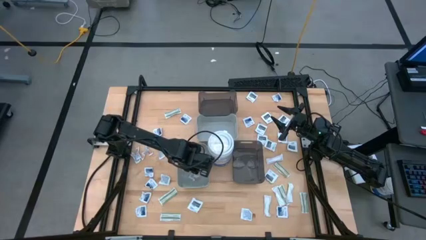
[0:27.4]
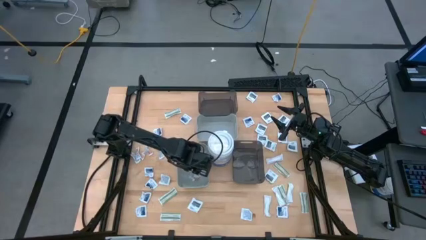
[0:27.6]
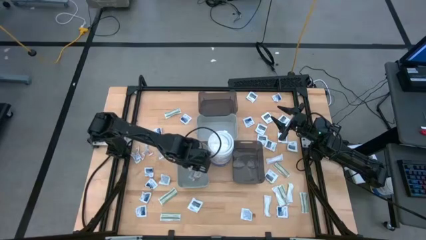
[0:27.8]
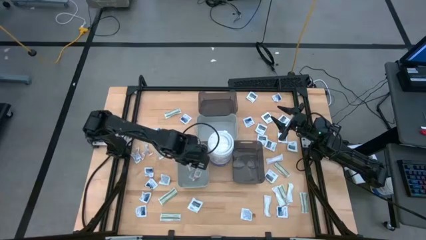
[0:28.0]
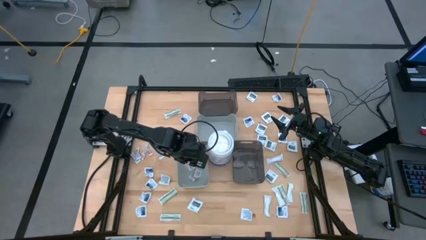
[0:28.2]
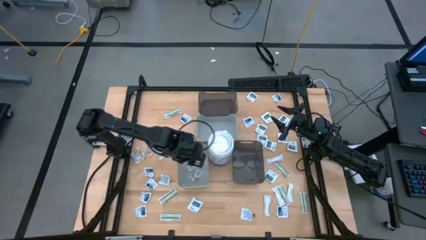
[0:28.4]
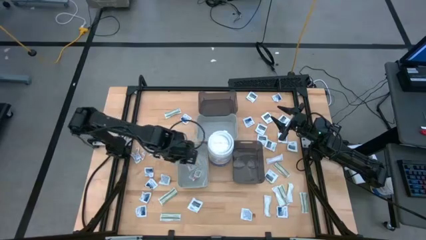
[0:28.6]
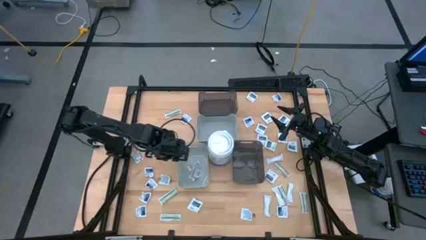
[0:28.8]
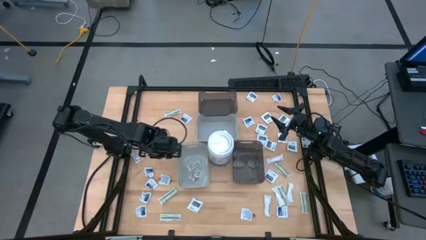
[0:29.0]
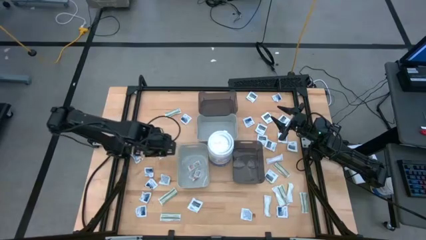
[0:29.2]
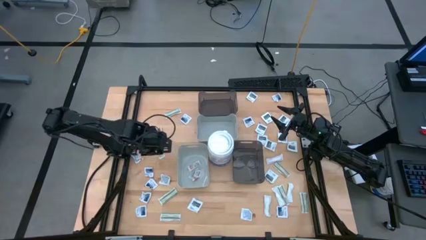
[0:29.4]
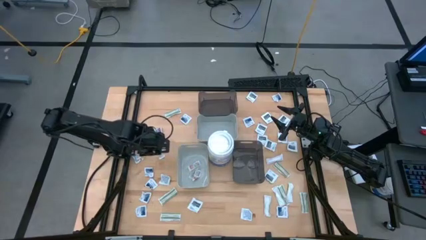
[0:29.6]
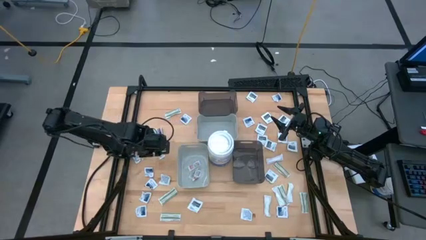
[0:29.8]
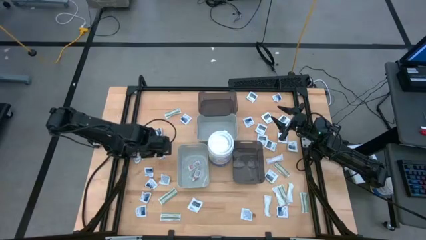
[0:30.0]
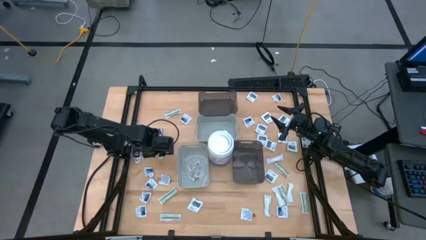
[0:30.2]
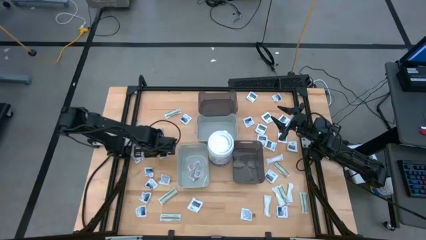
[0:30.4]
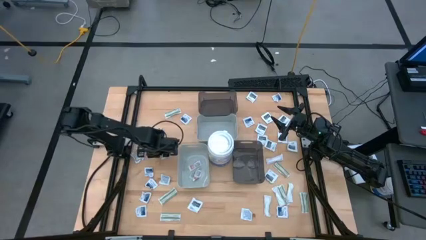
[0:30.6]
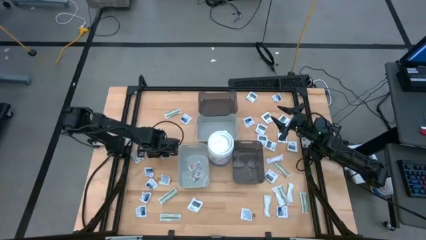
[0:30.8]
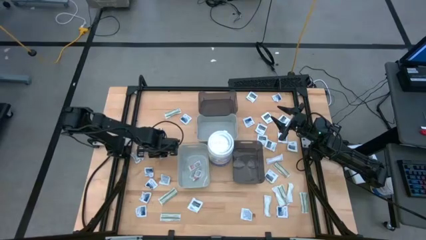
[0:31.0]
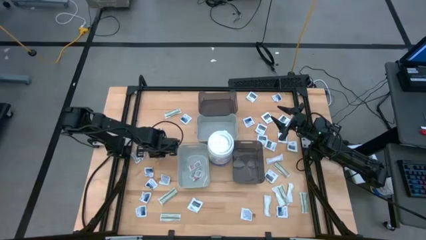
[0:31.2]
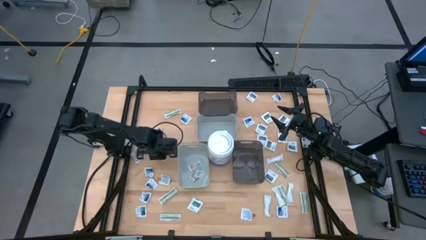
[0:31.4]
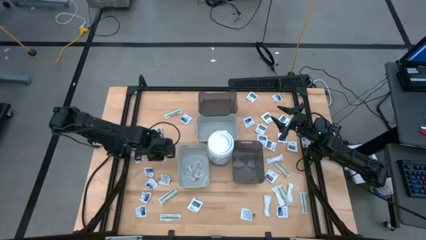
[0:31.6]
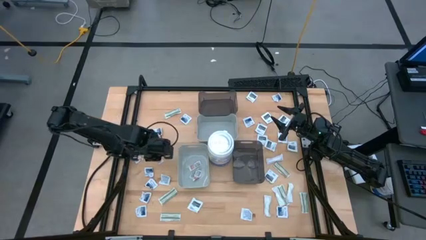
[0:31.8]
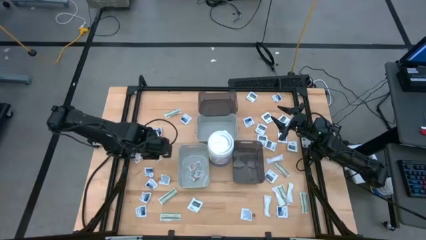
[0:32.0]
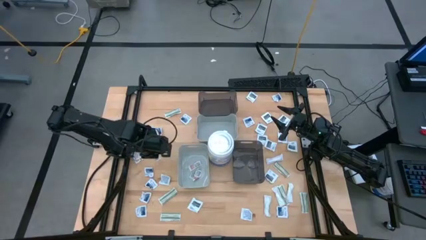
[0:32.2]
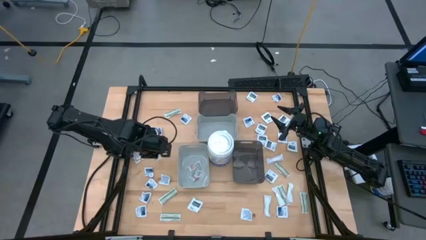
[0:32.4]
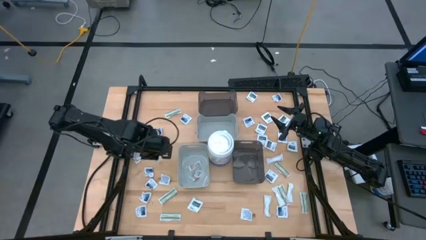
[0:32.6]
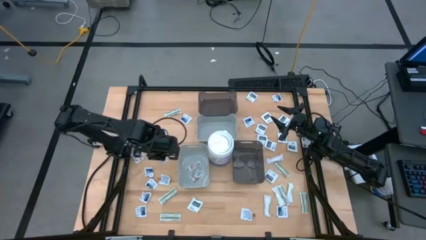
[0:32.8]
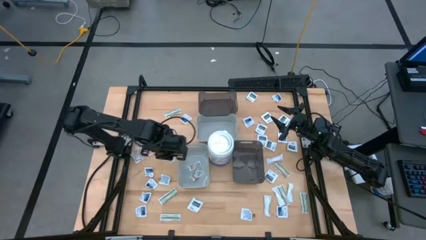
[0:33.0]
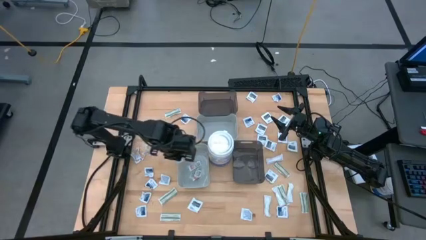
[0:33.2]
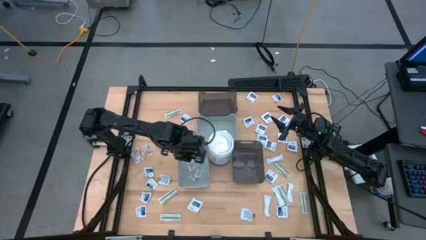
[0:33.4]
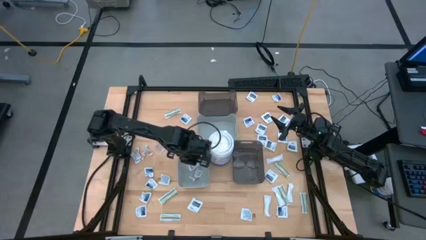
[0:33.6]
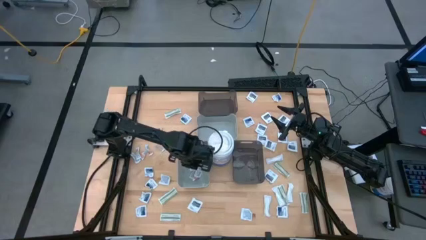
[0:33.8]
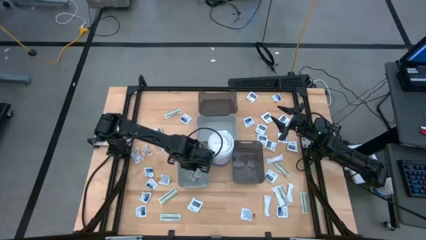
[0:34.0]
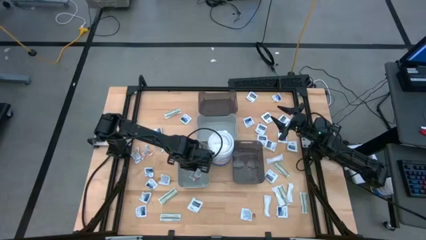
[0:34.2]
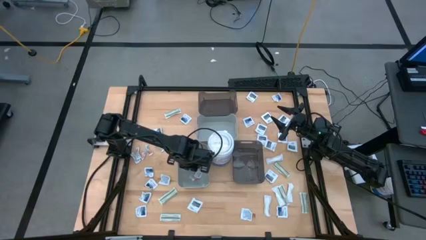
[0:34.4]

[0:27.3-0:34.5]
Task: Pick & Place First Aid Supplies
Put the ointment pack into the bottom gray bin

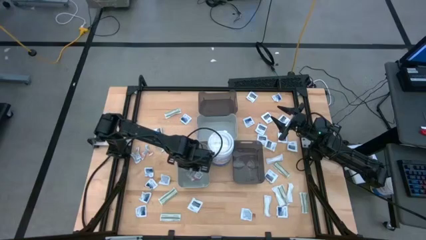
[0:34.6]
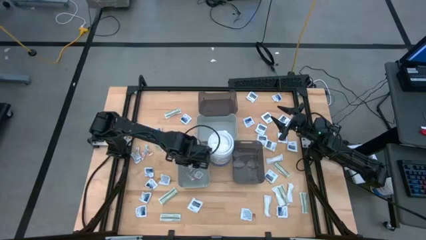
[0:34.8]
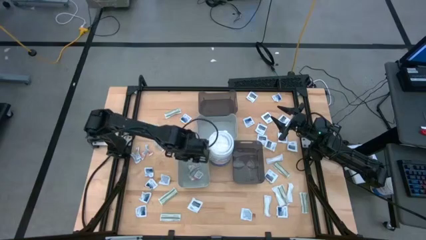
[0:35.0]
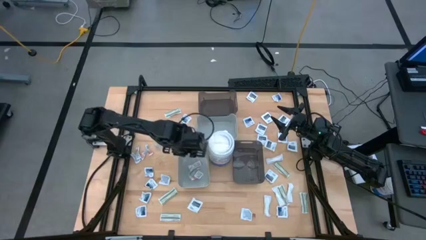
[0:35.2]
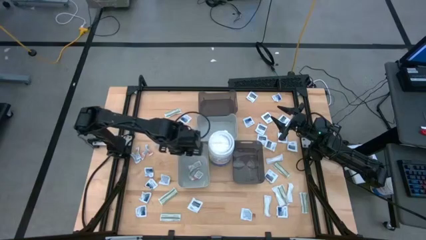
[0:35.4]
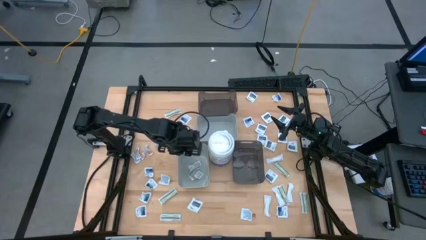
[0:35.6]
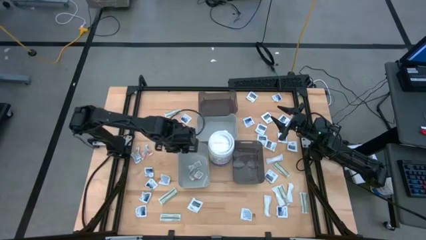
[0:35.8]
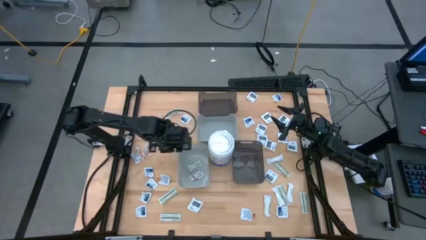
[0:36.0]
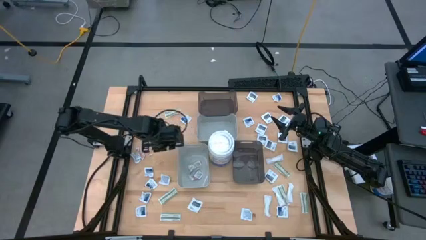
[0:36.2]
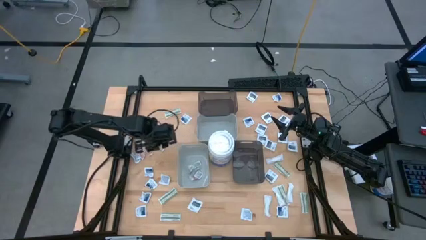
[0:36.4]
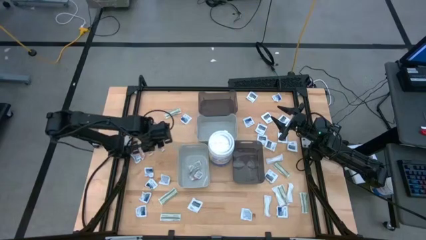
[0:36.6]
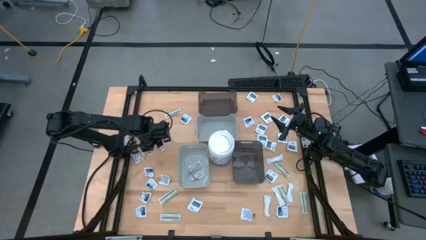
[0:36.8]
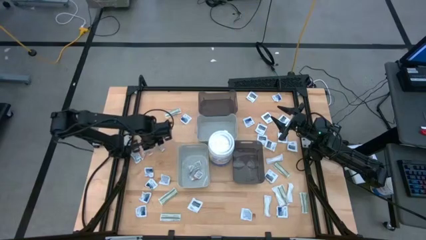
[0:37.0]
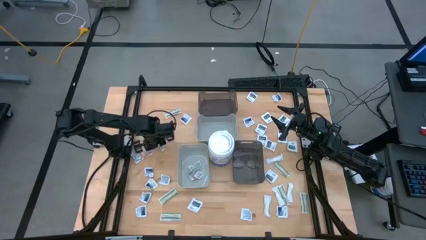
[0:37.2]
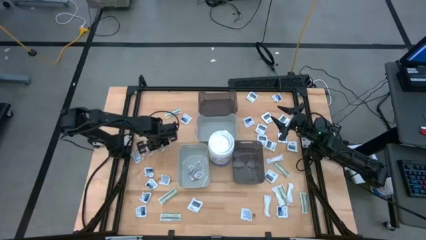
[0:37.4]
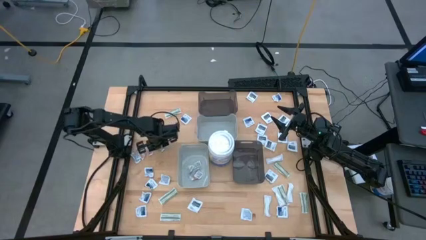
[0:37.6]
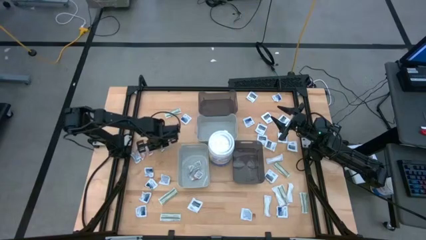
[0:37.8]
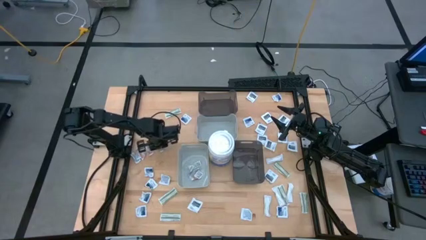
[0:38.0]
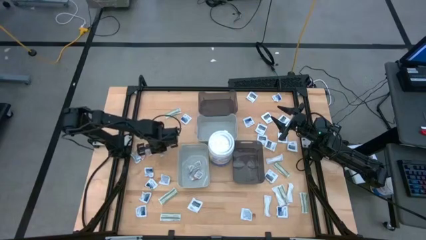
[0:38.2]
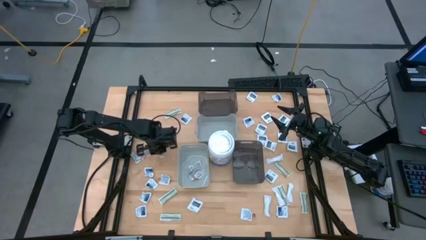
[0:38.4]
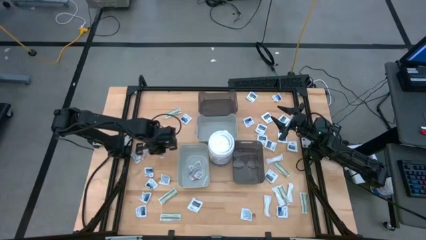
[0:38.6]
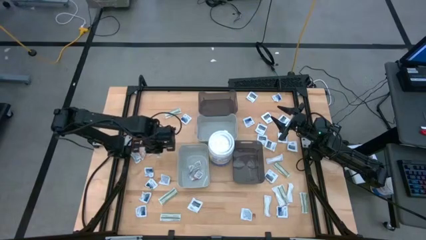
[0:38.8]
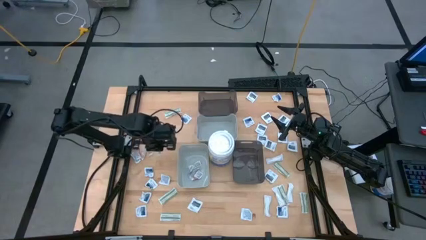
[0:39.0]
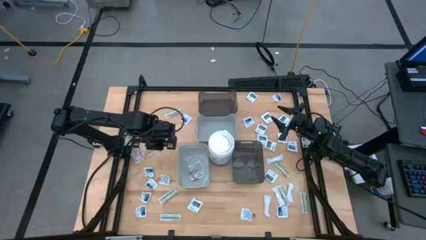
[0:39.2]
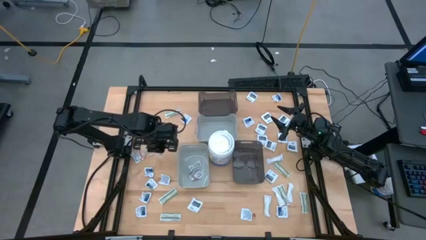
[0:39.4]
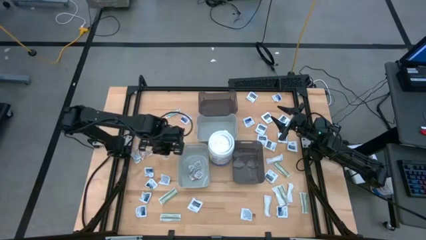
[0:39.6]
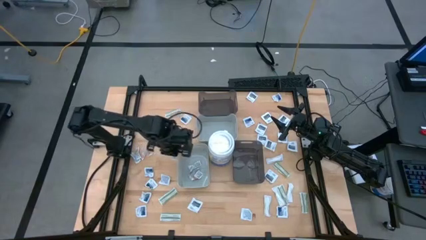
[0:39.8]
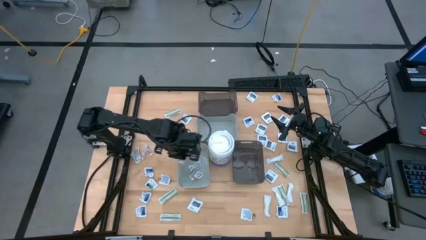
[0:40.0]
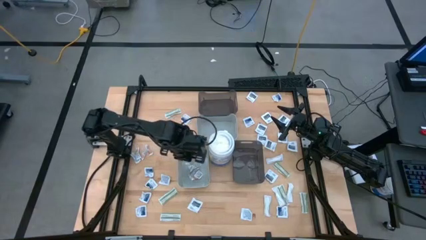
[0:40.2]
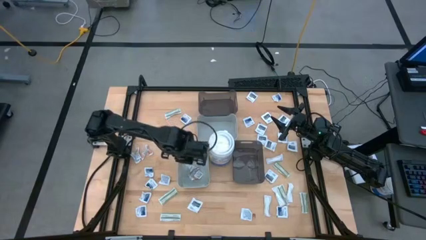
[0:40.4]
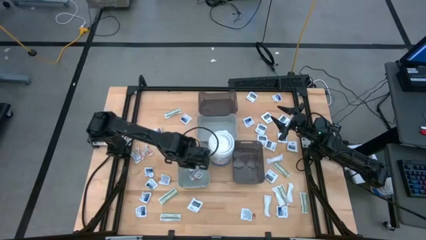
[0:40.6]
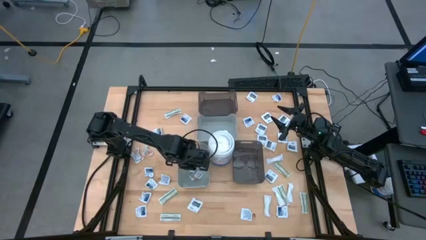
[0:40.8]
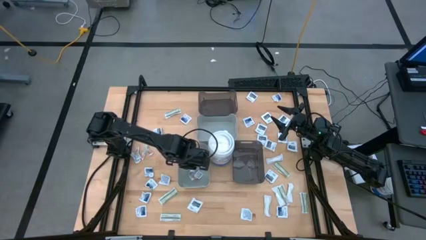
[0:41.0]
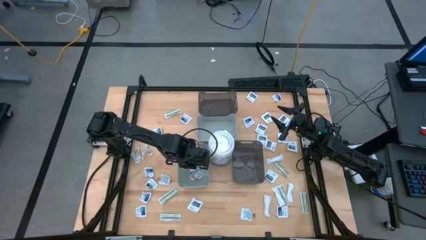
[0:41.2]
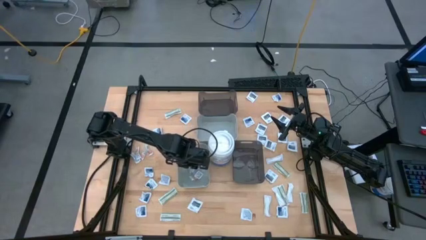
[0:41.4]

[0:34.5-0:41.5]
Put the ointment pack into the bottom gray bin

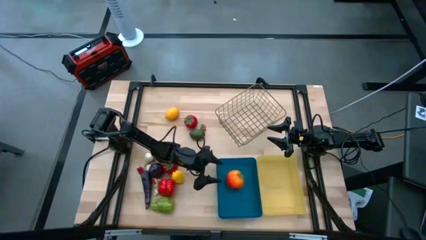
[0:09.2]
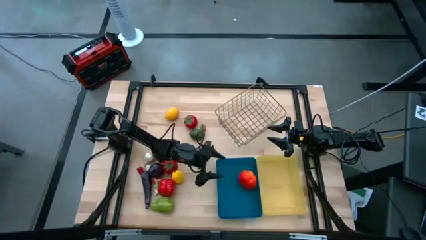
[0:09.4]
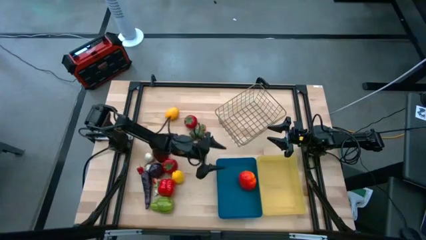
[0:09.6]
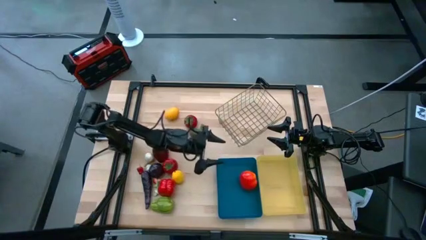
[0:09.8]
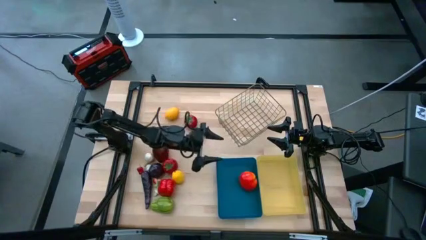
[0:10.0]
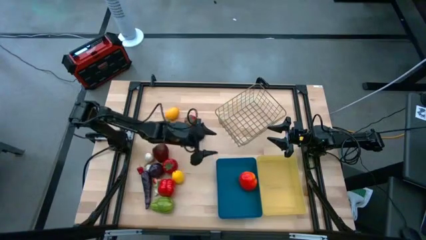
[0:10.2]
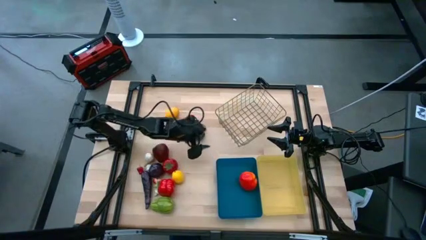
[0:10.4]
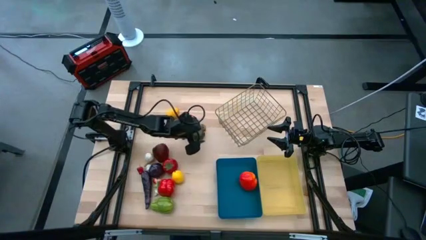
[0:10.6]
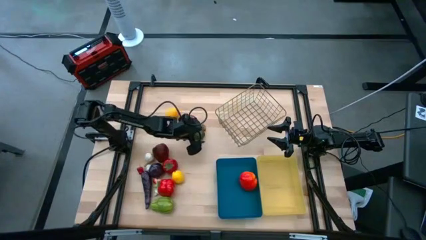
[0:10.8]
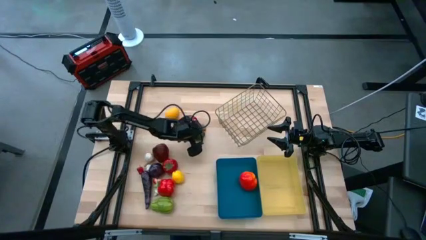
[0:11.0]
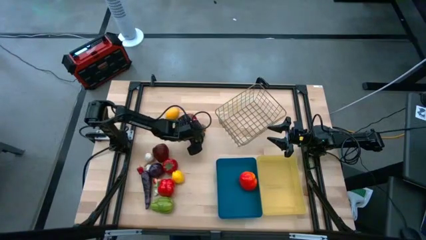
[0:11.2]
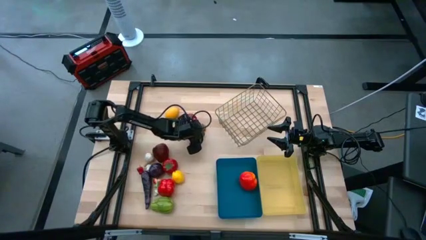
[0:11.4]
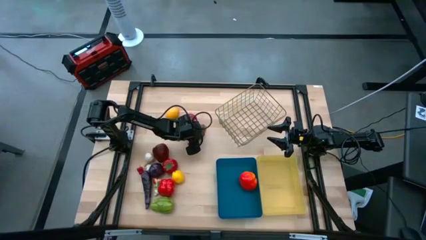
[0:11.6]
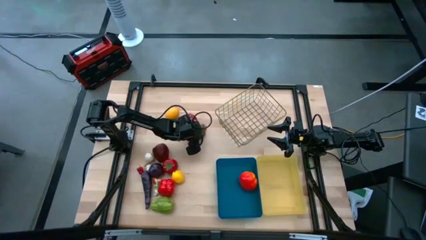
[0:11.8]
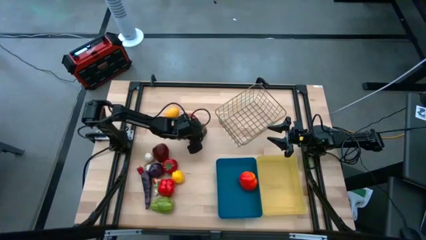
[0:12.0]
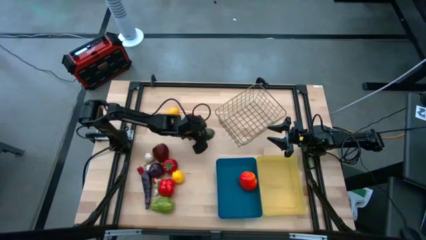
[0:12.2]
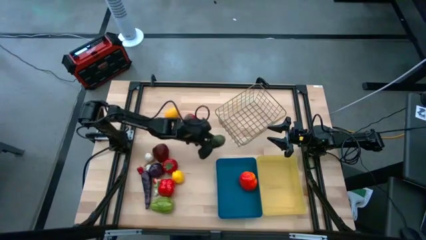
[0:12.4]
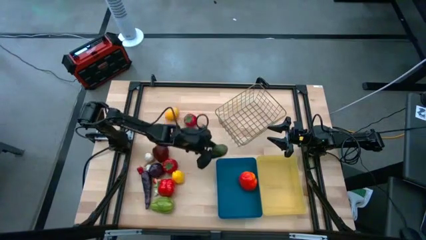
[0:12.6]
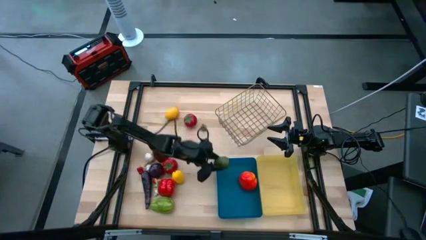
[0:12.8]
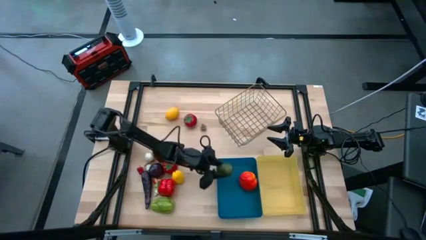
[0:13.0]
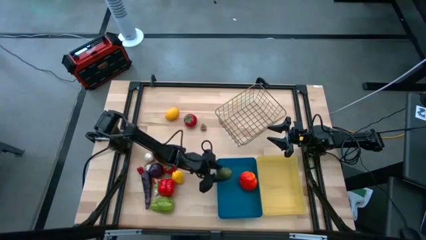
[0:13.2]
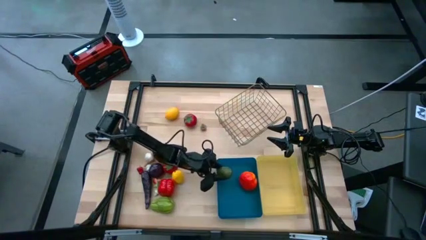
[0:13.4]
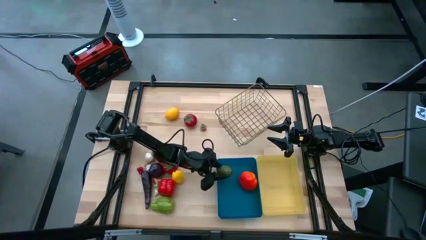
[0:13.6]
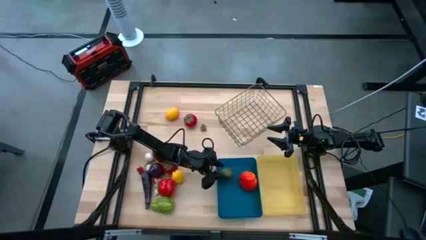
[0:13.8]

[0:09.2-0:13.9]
Task: Sort produce into baskets
Put the green lime into the blue bin
